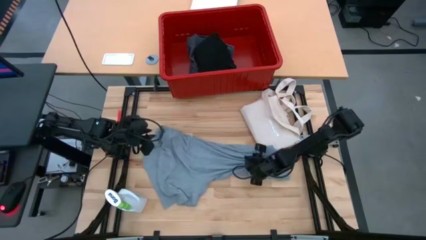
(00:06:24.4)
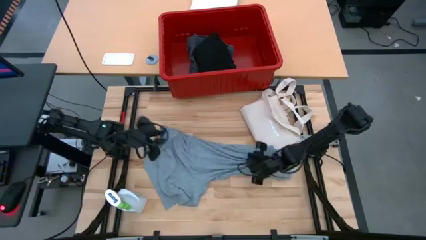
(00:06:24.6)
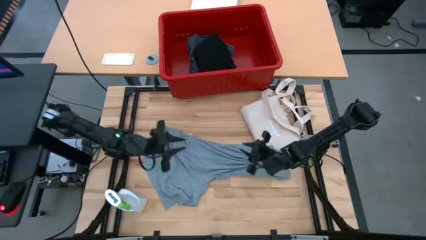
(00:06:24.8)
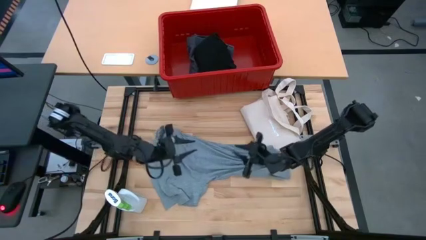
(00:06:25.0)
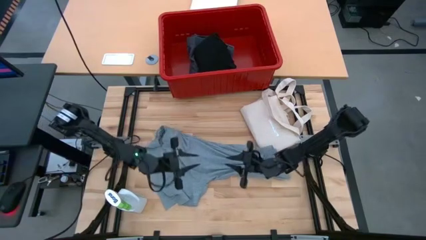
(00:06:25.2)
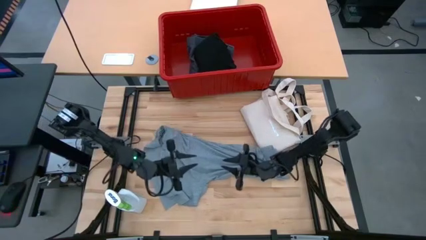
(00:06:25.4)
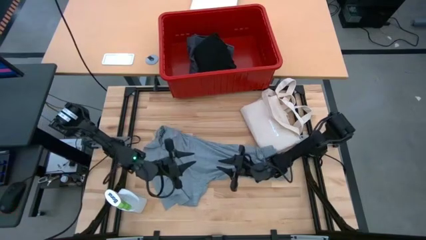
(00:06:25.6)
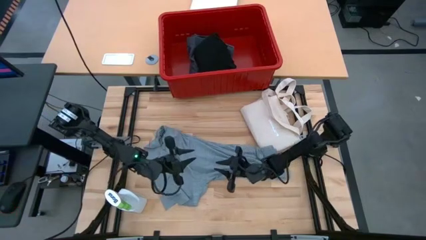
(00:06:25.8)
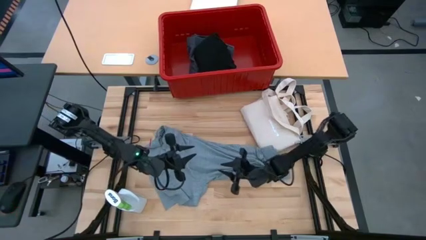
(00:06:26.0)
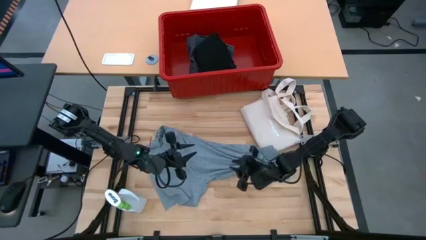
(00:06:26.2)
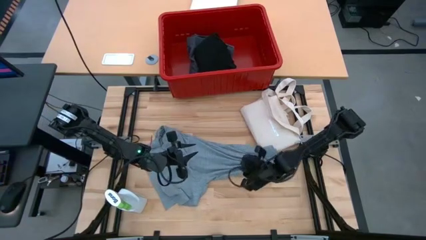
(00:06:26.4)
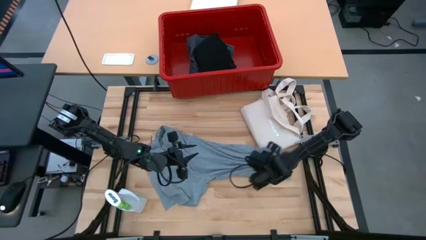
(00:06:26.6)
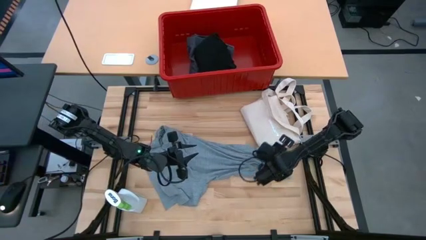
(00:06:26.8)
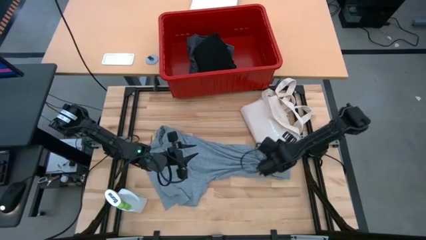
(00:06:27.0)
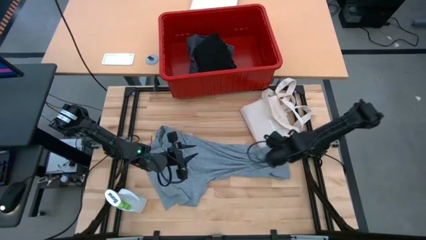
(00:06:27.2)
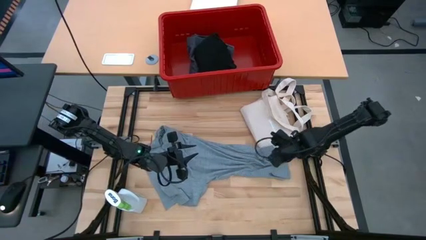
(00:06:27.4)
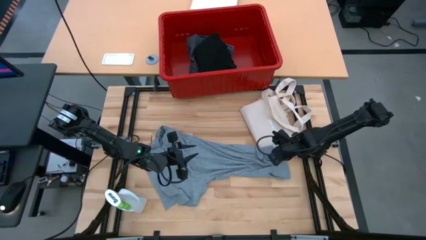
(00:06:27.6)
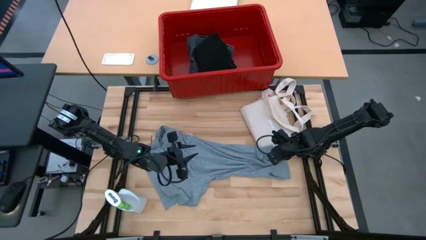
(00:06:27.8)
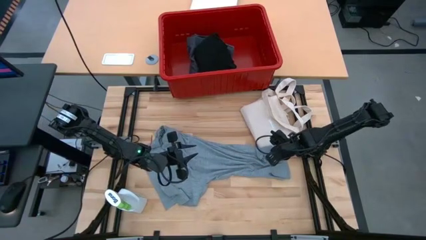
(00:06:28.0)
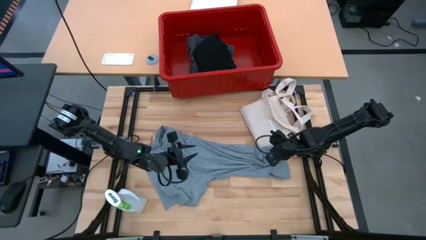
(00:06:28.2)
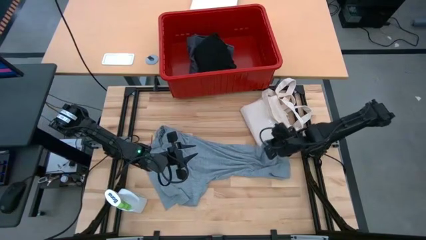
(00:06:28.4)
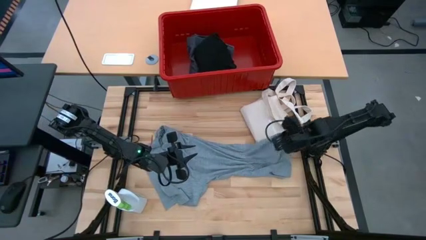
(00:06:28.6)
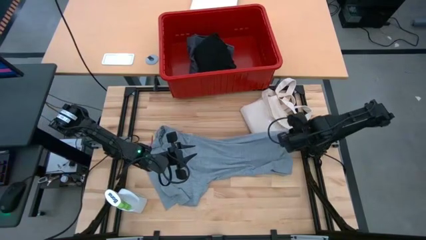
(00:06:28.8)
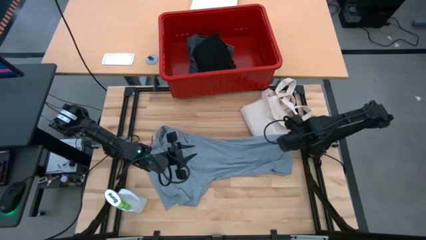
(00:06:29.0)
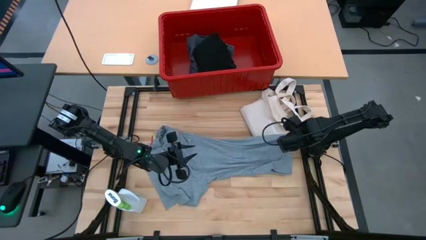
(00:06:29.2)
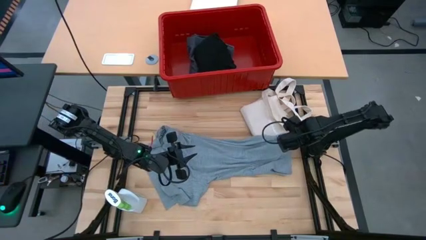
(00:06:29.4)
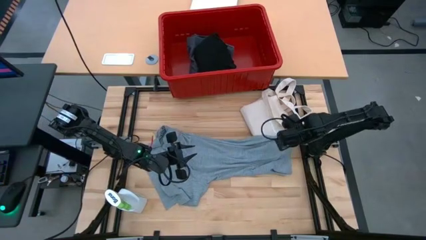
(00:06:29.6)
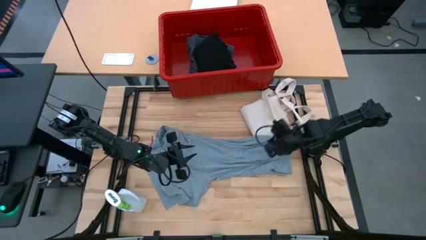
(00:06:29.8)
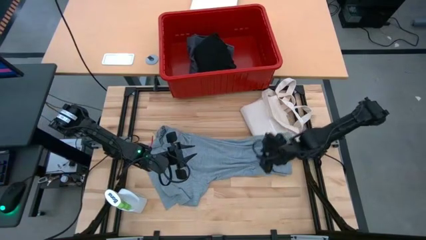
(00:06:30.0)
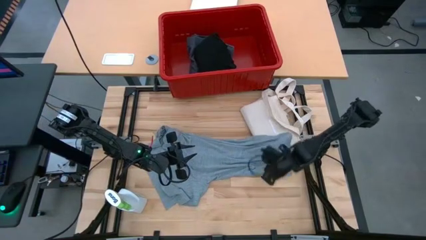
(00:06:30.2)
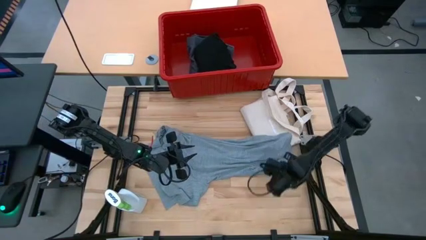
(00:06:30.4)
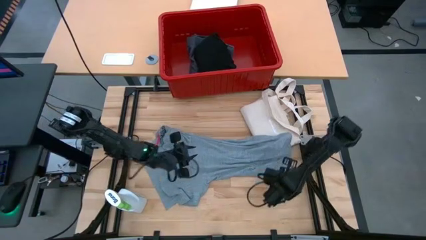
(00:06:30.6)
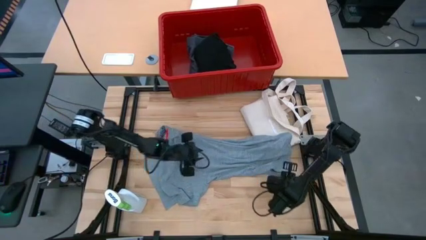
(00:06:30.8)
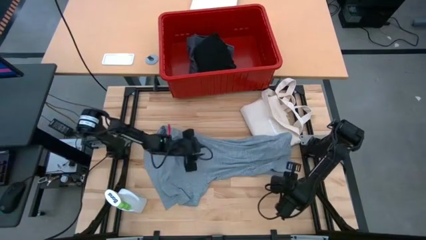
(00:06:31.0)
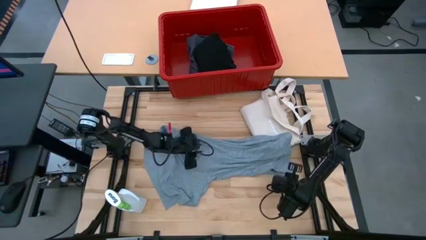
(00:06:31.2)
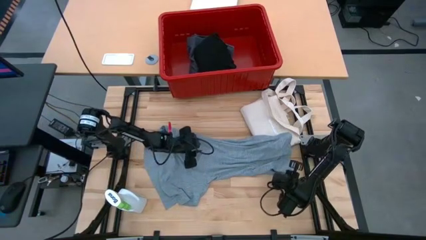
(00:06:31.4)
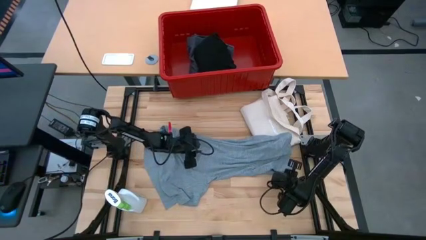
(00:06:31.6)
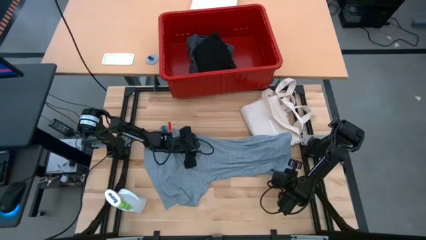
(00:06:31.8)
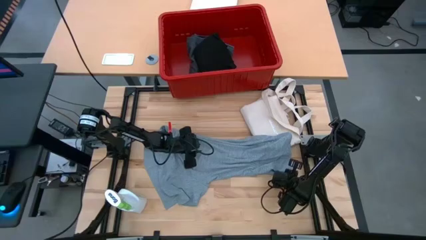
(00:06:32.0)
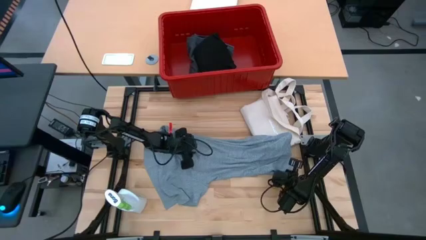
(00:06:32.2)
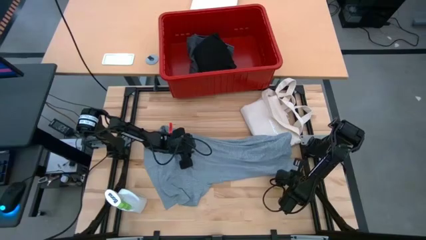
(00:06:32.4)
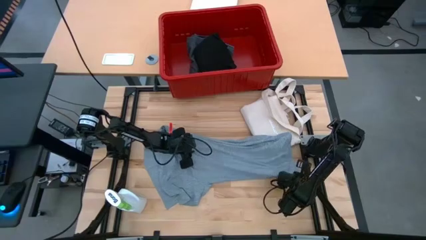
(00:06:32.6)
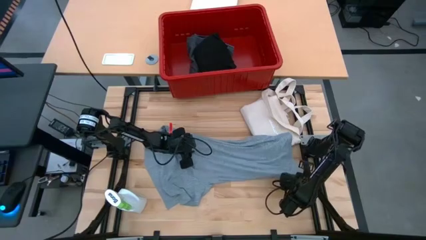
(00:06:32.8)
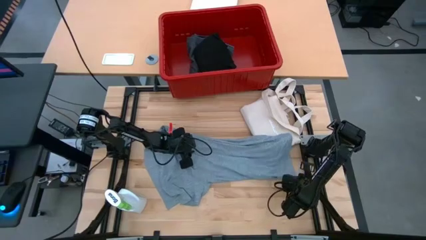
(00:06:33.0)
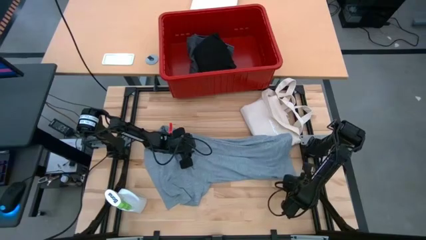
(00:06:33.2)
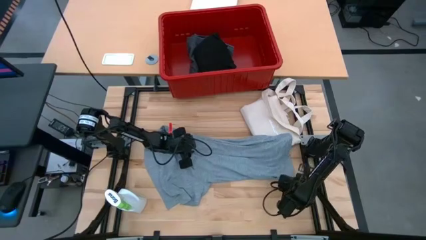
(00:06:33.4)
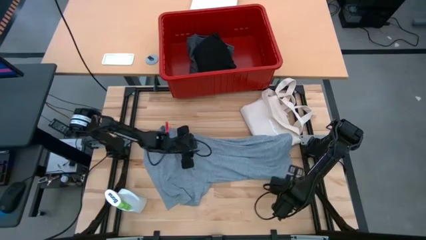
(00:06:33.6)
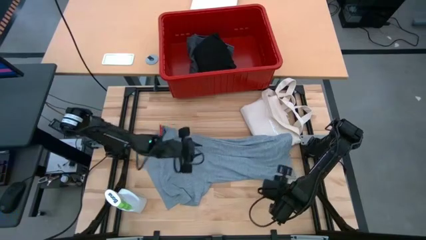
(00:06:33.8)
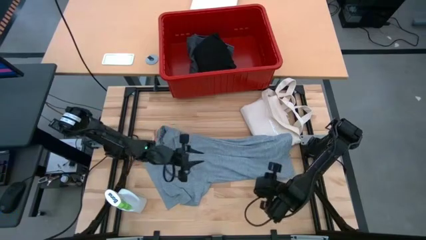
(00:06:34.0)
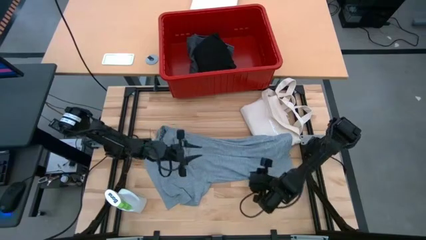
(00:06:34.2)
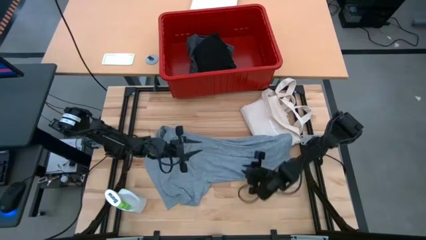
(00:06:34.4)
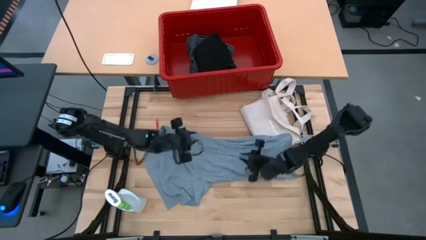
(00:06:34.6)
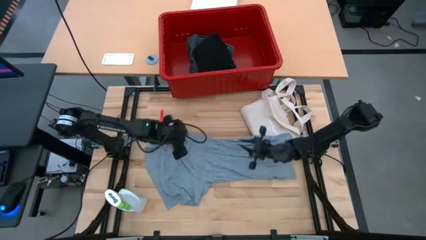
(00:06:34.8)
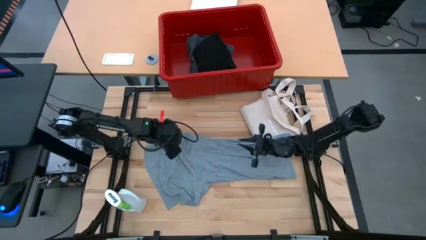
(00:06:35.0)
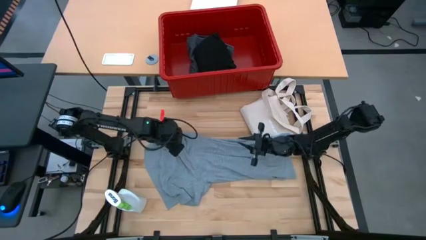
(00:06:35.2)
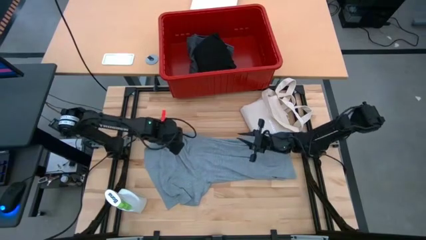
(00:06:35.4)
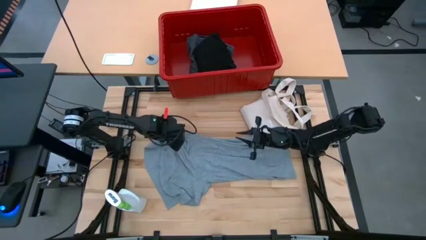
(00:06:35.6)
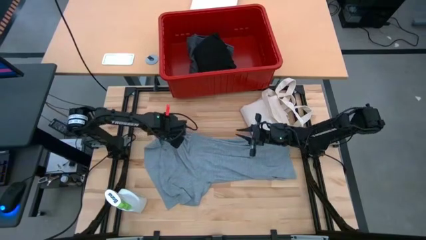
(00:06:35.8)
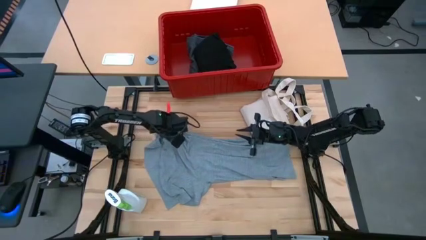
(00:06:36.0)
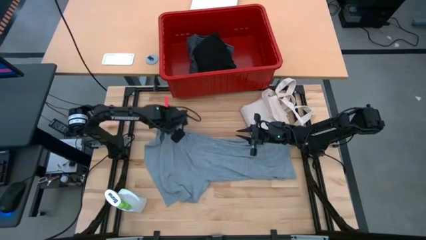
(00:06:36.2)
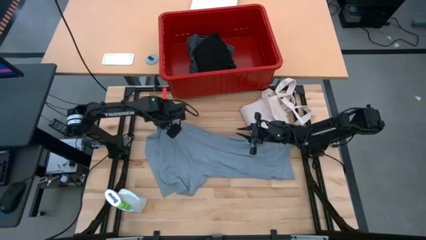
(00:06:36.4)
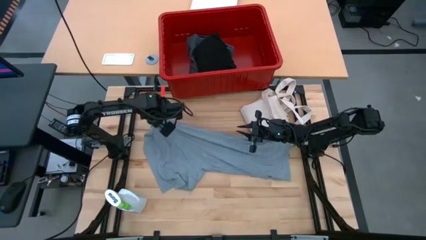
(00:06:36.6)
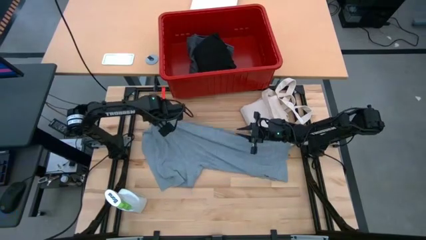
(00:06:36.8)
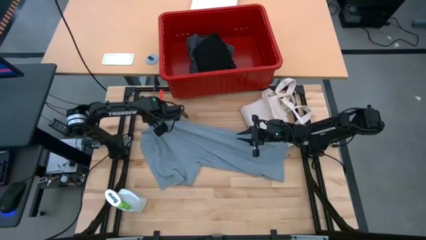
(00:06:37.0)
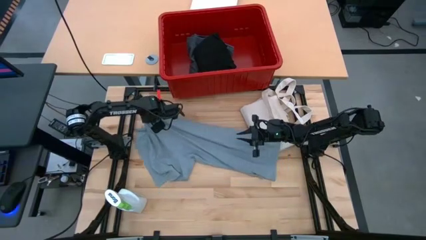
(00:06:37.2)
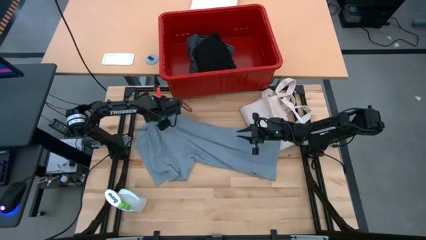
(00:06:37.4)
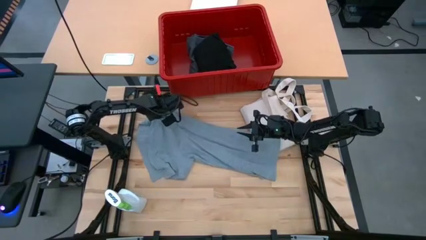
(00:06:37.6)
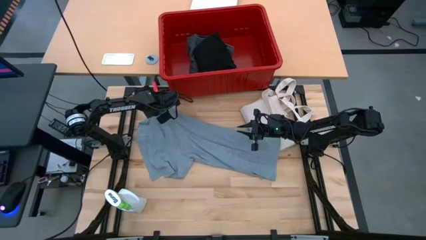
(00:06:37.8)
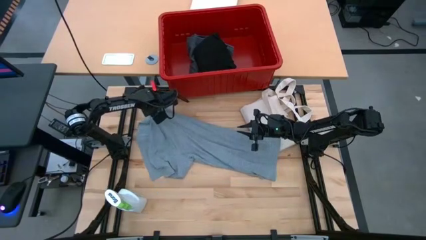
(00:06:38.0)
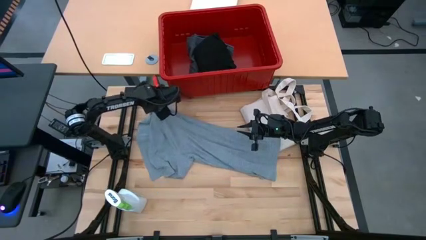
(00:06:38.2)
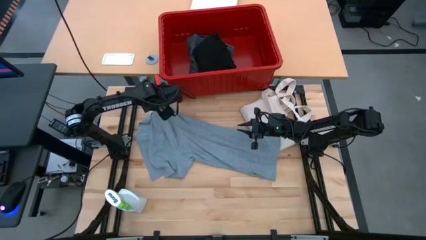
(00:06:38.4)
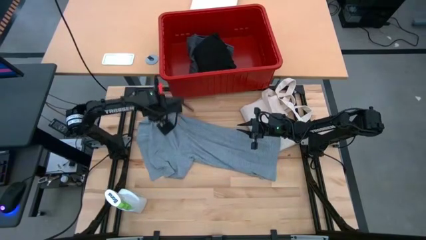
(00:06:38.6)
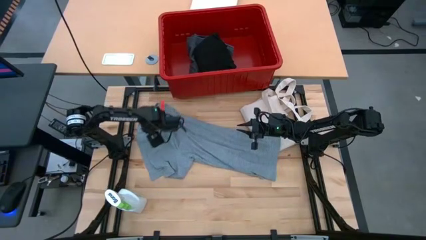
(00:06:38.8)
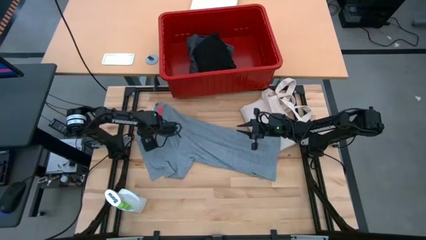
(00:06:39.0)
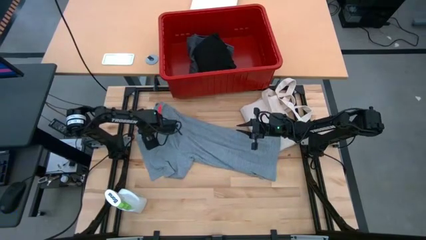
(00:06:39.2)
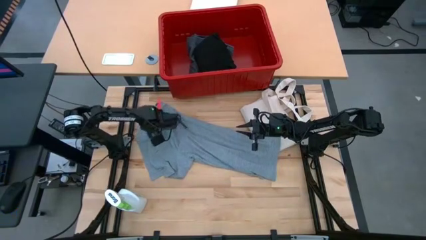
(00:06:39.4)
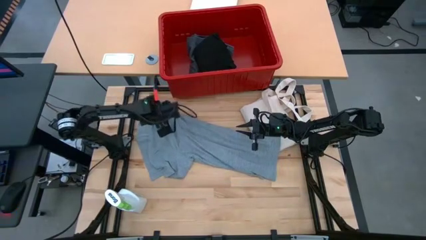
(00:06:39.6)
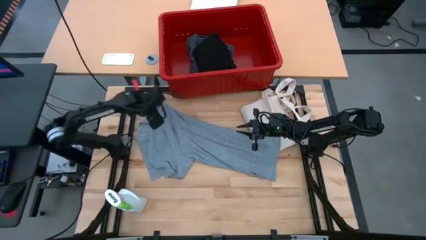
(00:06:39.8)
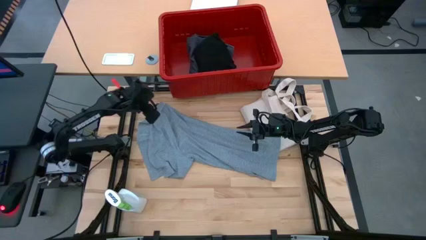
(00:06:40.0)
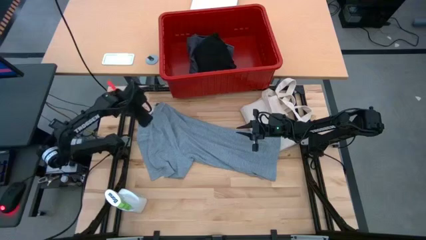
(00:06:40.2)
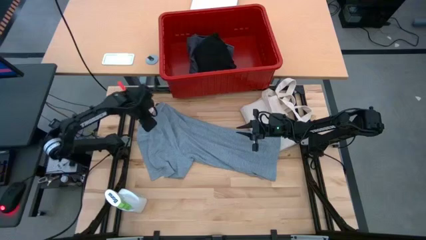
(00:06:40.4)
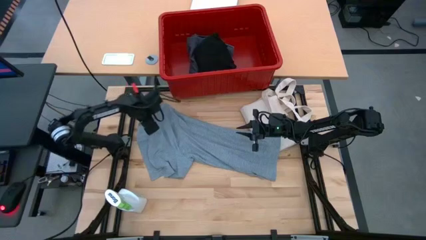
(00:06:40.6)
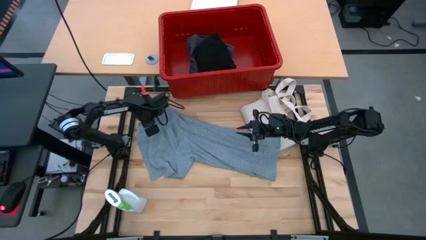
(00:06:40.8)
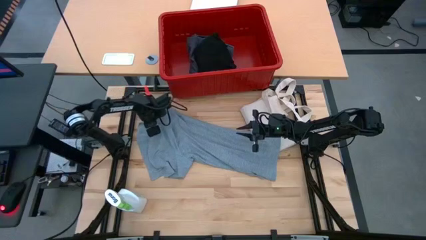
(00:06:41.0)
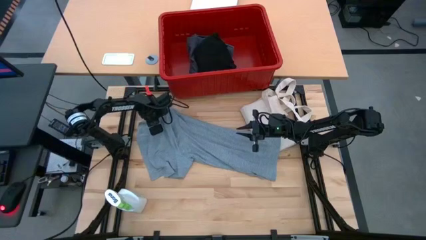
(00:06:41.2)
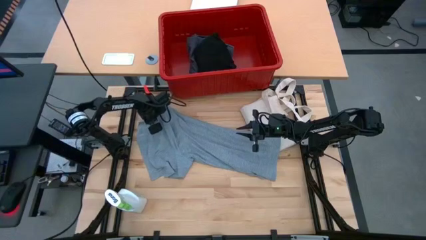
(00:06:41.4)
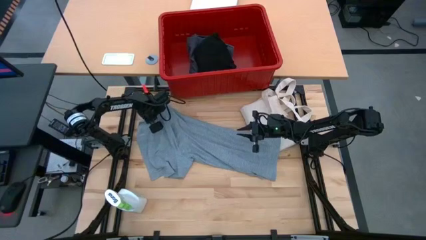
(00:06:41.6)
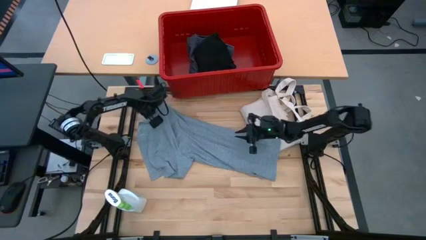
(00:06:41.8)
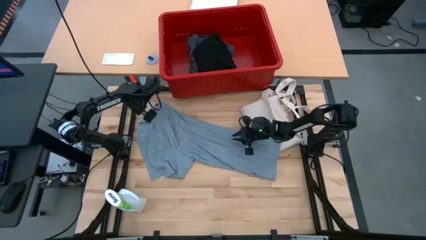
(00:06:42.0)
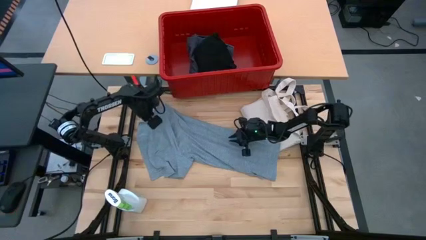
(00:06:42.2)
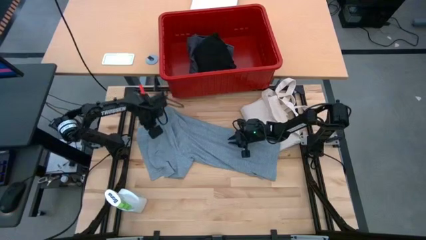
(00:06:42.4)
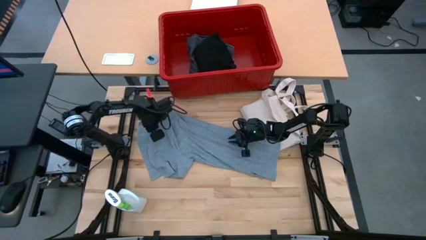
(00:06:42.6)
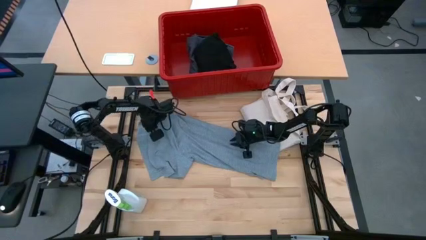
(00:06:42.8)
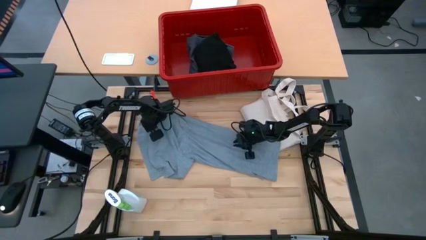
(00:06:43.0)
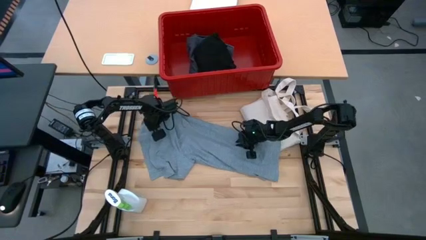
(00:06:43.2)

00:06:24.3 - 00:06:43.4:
Task: Fold Laundry from Bin
Fold the gray shirt
